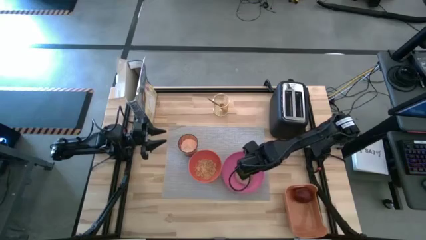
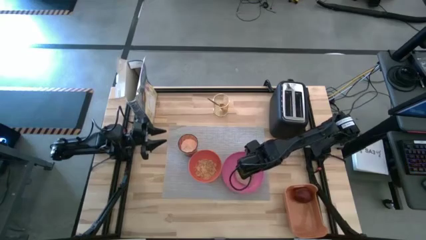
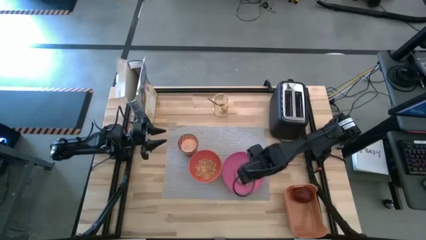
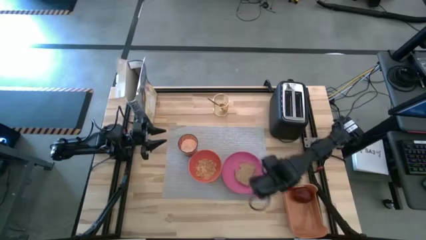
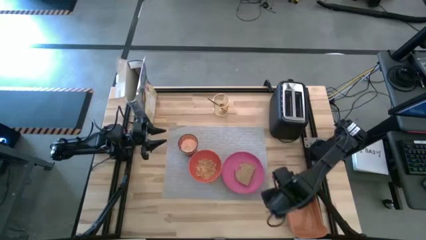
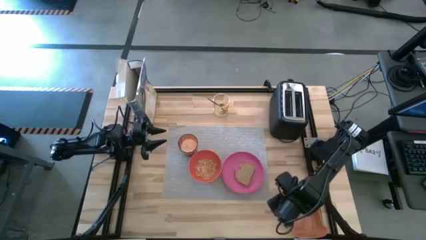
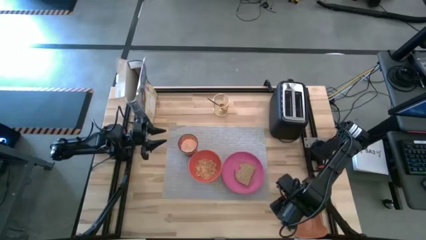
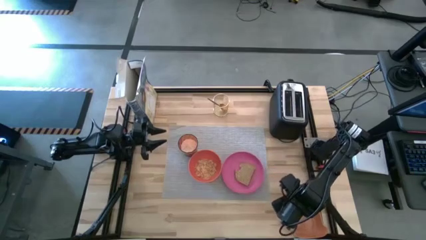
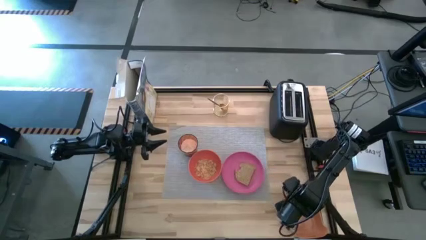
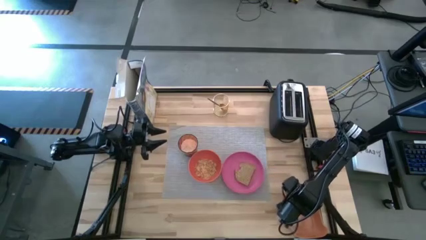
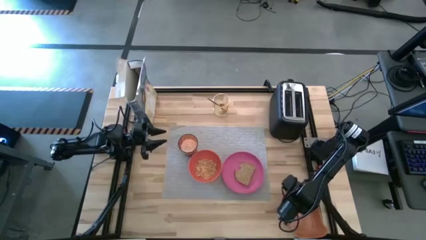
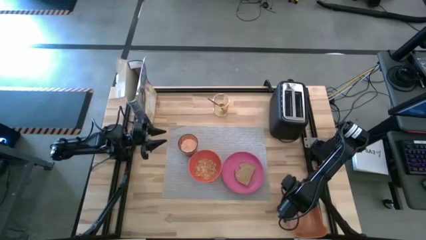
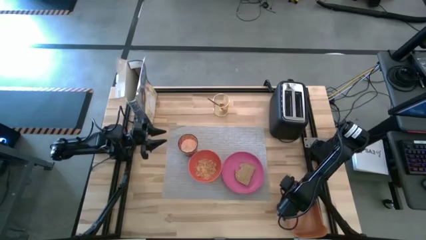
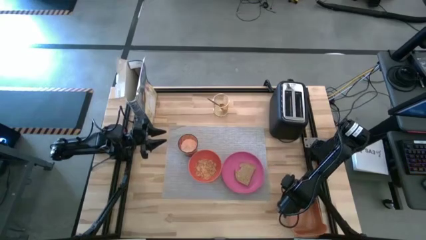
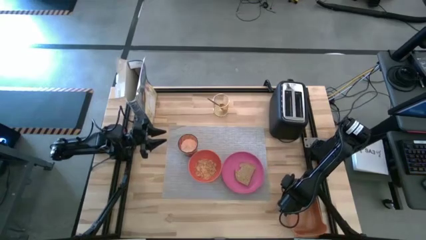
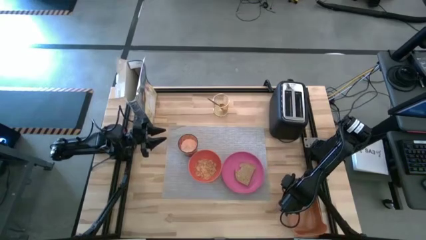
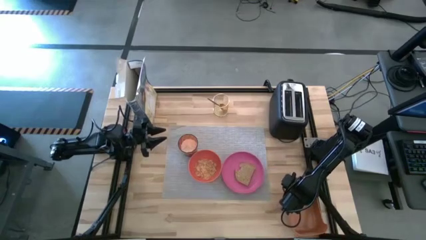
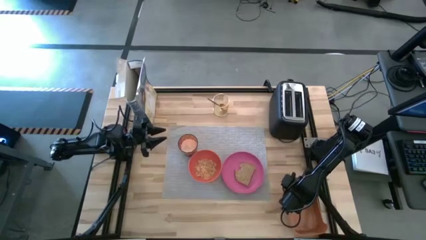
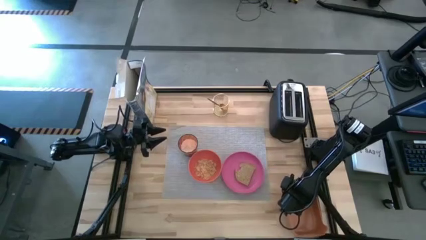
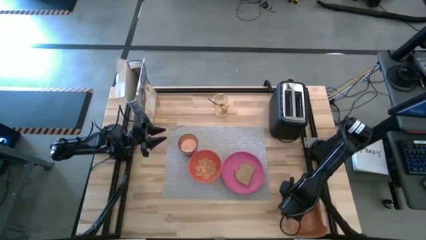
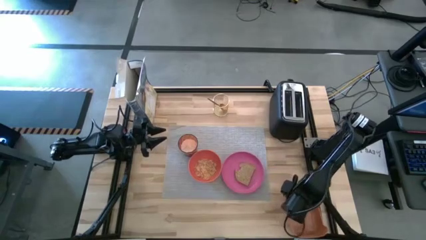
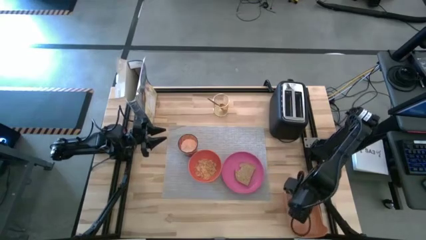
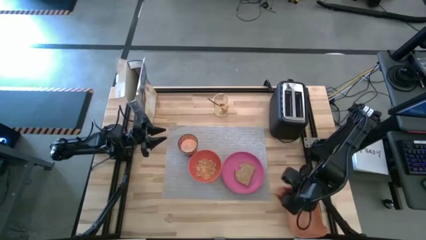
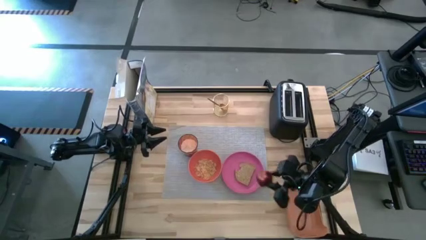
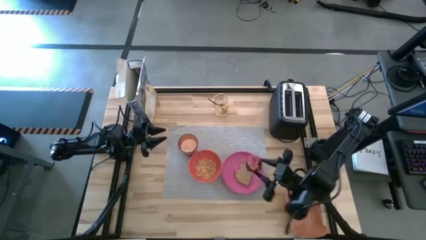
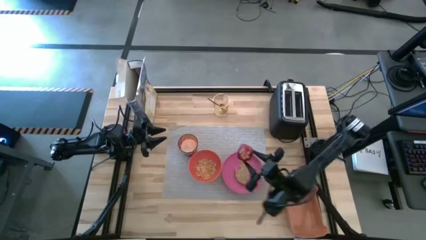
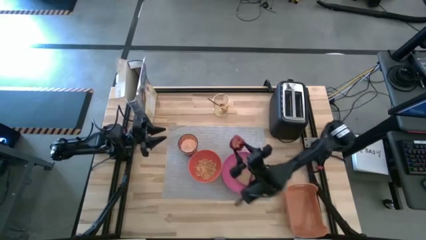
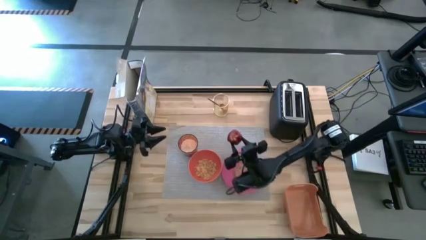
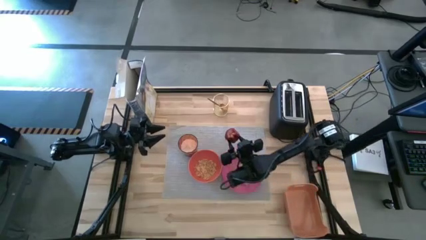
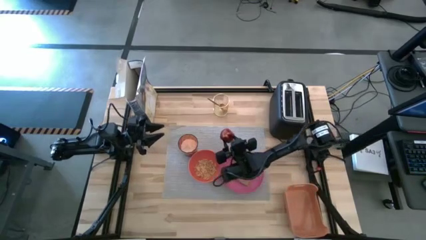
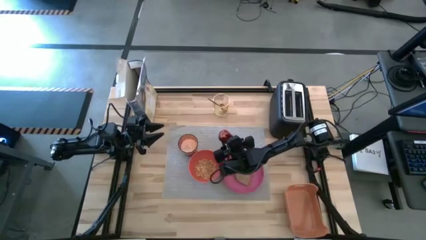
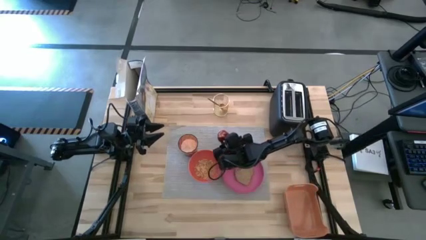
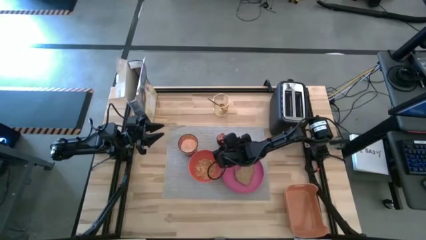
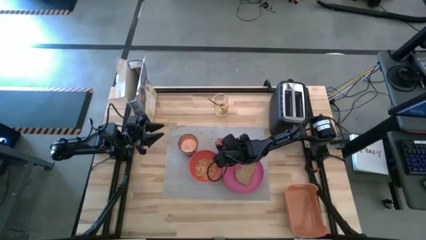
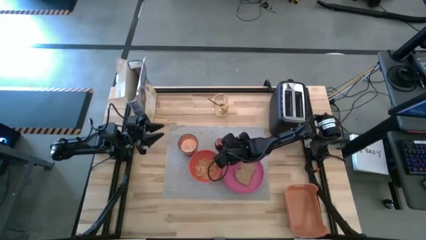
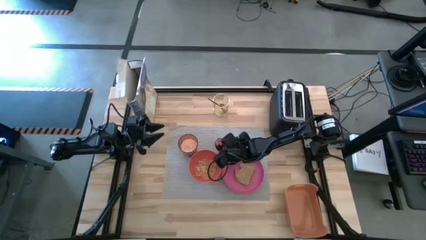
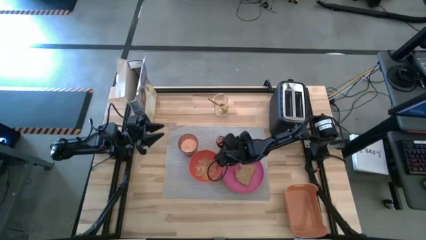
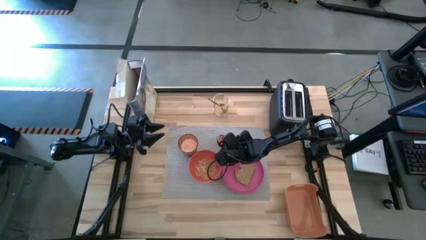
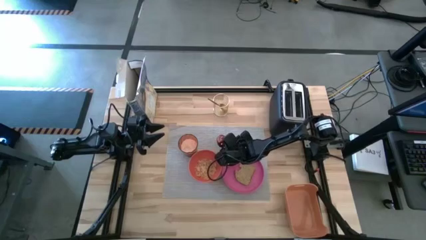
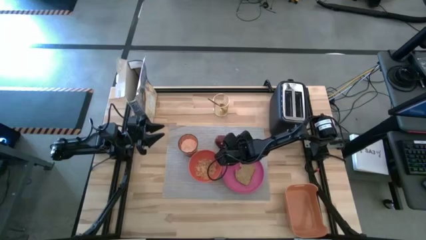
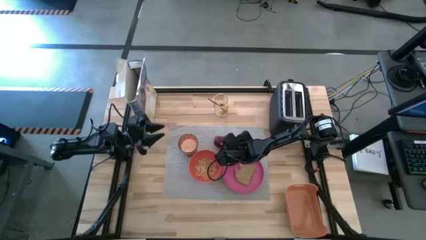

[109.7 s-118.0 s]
Task: Arrange a breakfast setting
Put the apple to the top of the orange bowl and pink plate on the gray table mat
